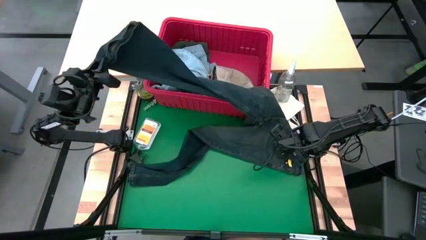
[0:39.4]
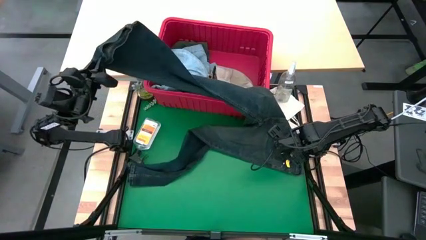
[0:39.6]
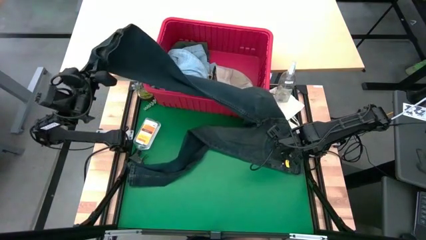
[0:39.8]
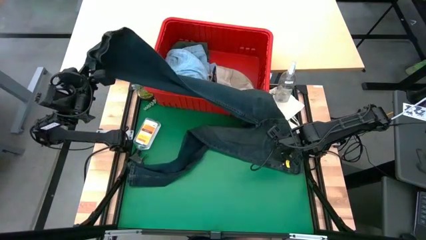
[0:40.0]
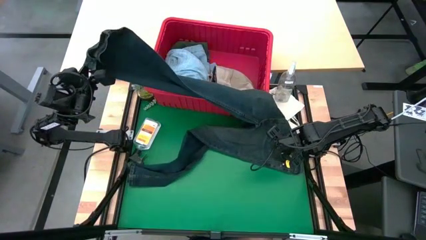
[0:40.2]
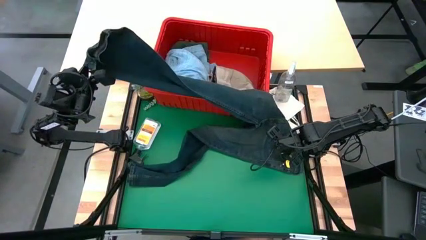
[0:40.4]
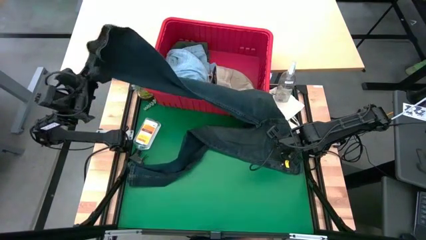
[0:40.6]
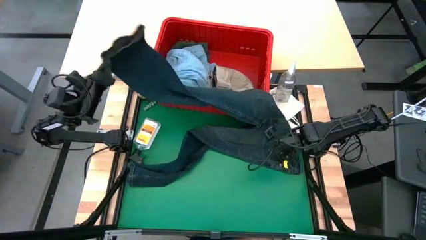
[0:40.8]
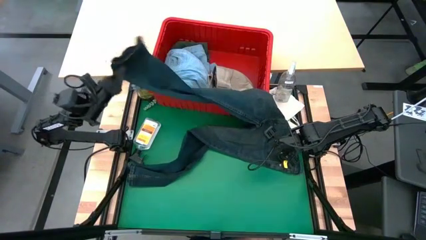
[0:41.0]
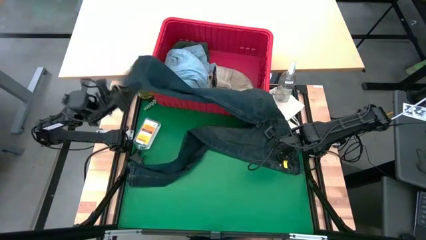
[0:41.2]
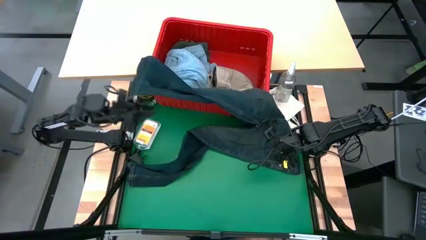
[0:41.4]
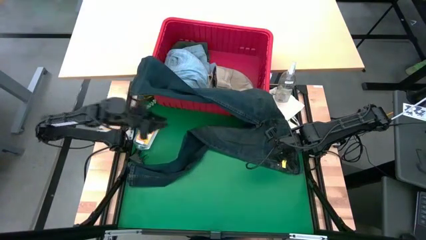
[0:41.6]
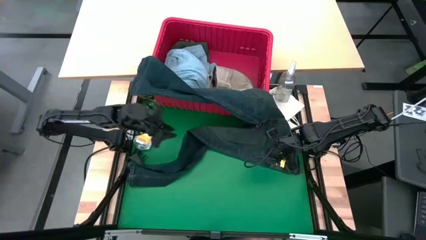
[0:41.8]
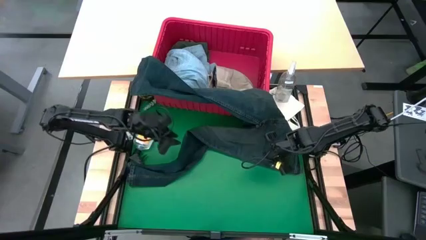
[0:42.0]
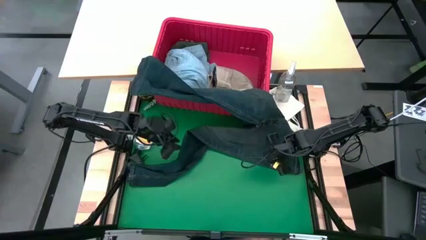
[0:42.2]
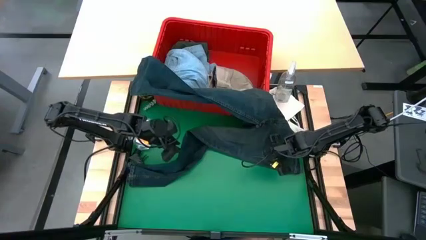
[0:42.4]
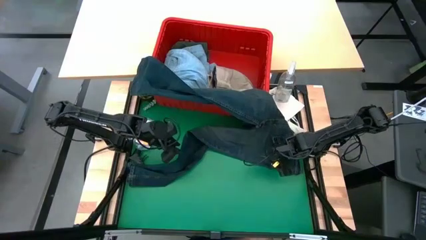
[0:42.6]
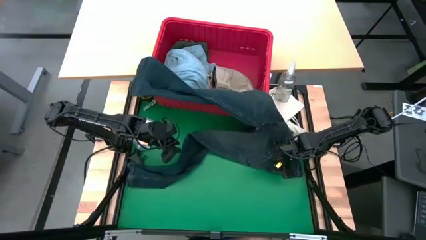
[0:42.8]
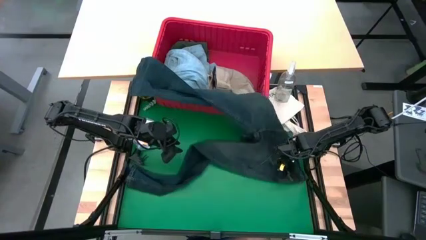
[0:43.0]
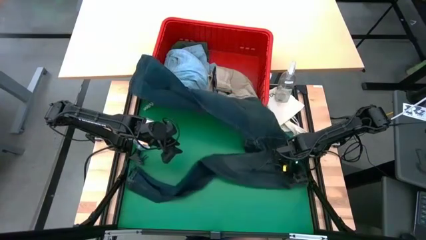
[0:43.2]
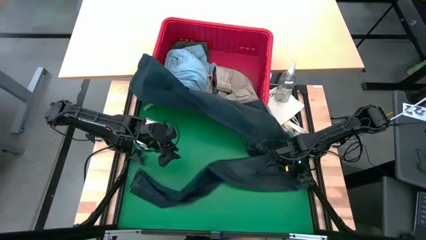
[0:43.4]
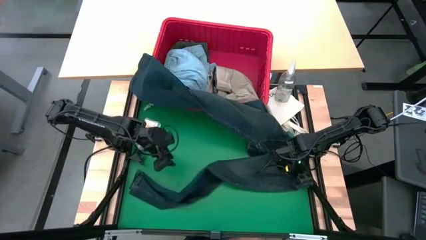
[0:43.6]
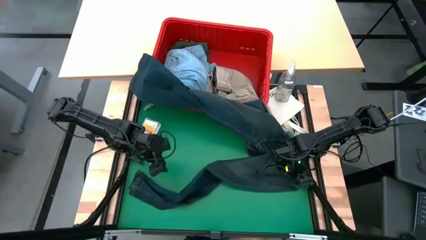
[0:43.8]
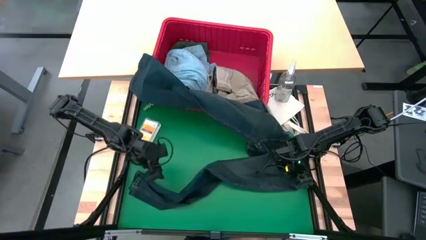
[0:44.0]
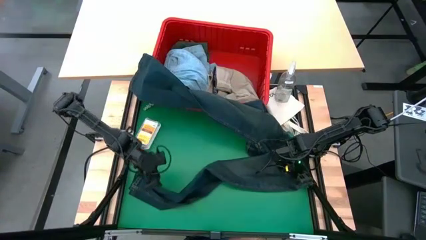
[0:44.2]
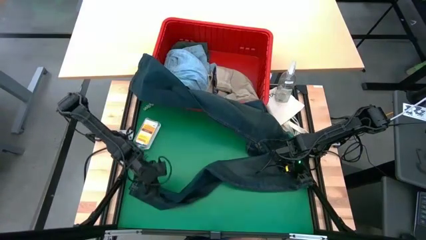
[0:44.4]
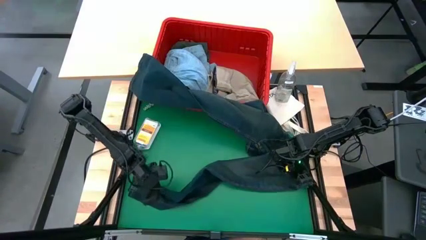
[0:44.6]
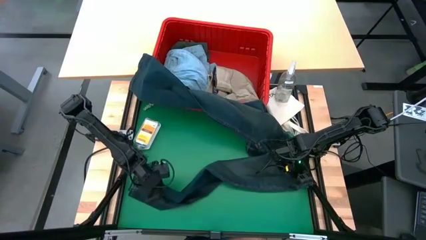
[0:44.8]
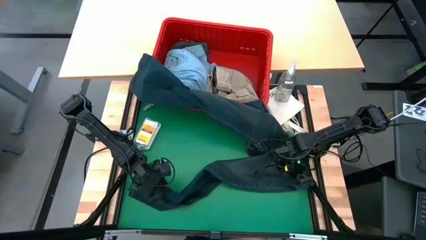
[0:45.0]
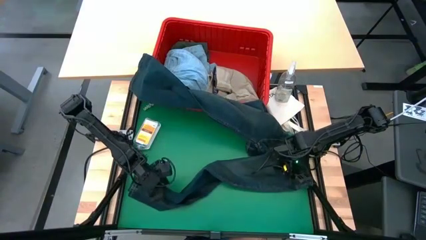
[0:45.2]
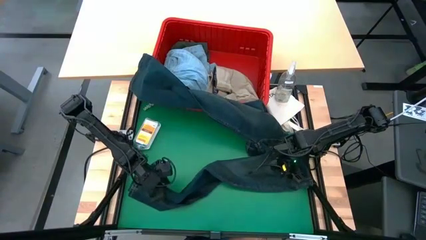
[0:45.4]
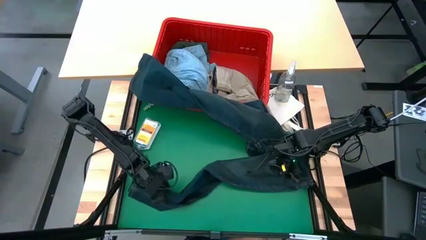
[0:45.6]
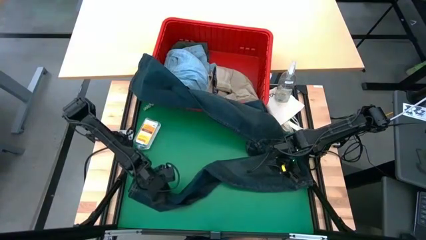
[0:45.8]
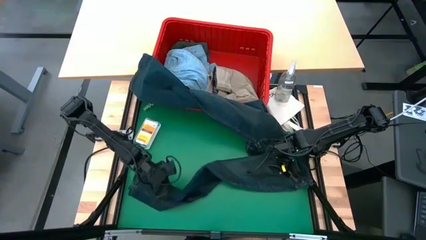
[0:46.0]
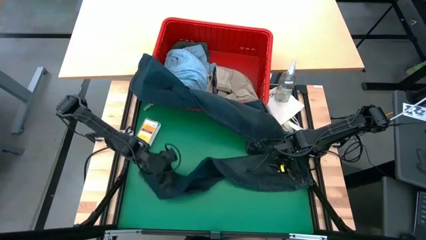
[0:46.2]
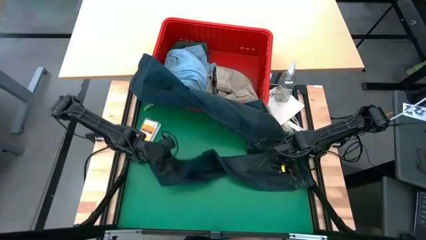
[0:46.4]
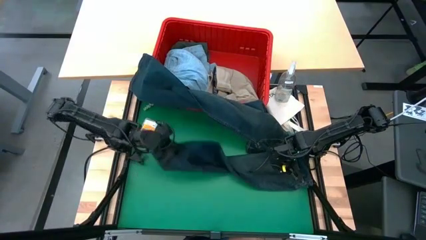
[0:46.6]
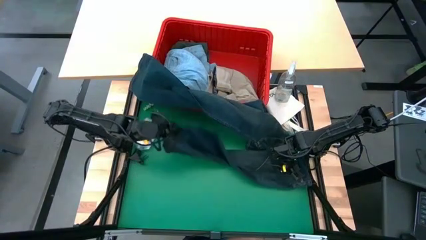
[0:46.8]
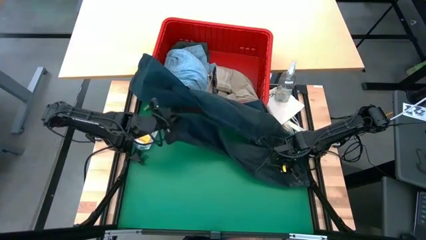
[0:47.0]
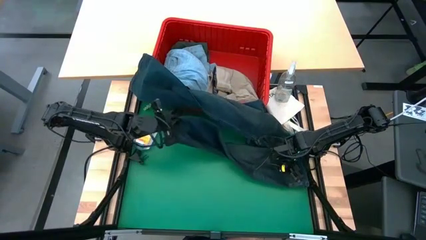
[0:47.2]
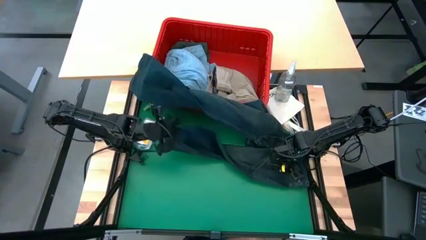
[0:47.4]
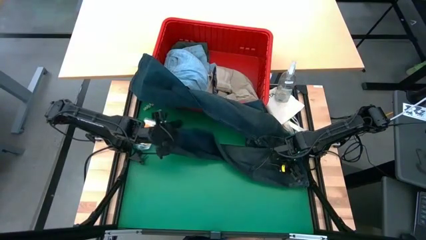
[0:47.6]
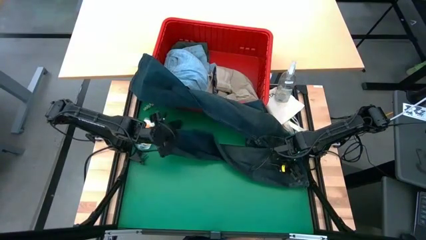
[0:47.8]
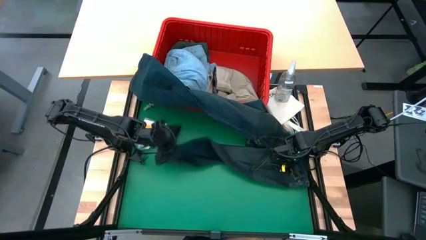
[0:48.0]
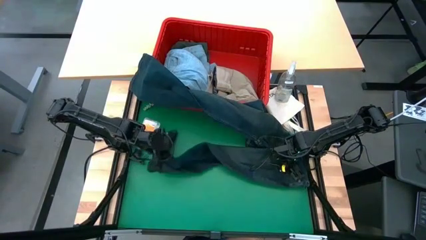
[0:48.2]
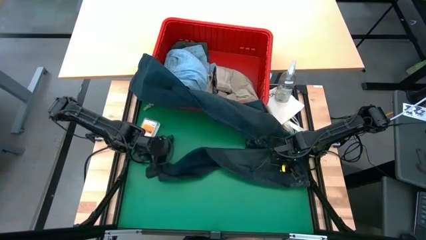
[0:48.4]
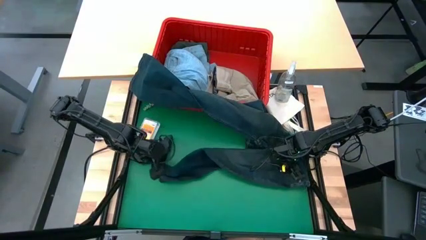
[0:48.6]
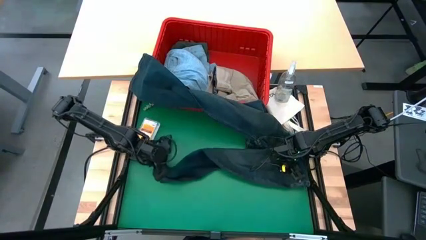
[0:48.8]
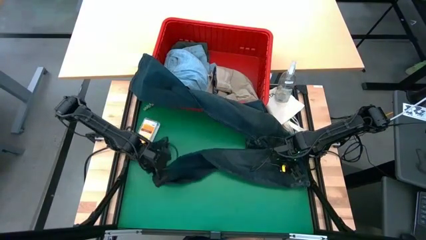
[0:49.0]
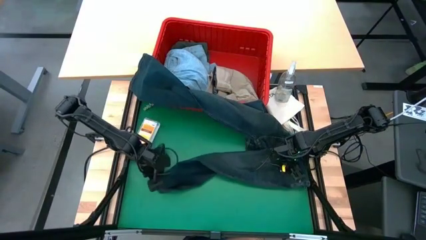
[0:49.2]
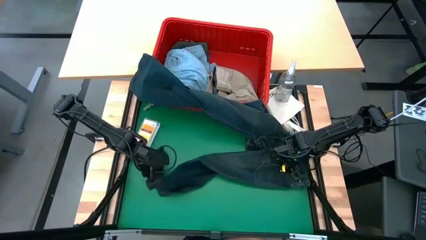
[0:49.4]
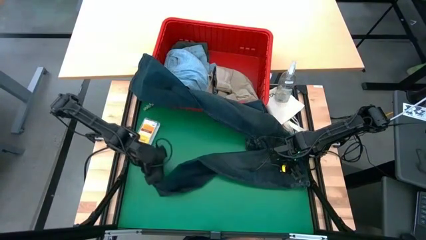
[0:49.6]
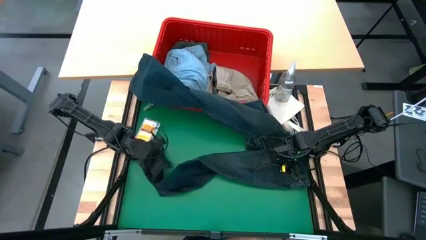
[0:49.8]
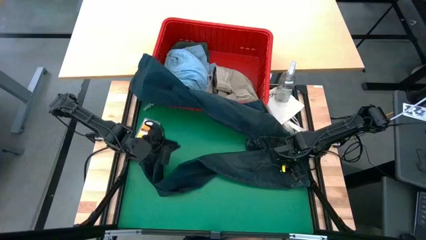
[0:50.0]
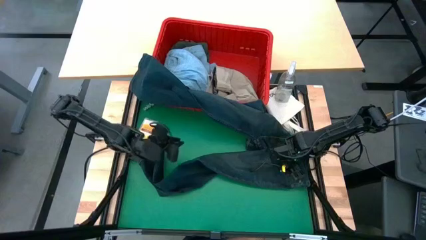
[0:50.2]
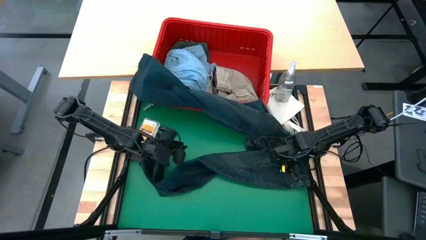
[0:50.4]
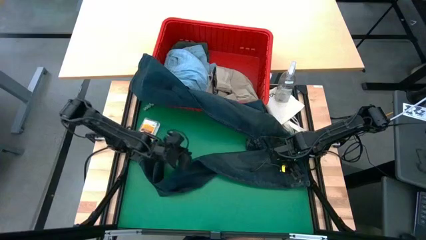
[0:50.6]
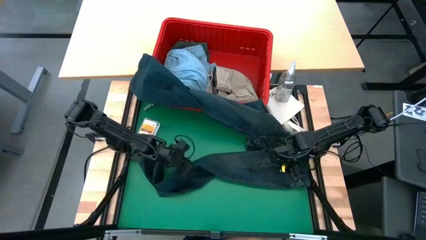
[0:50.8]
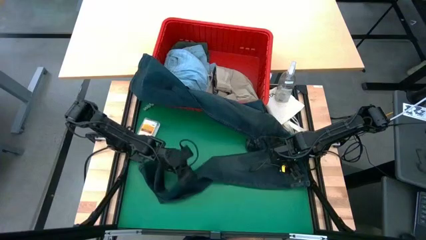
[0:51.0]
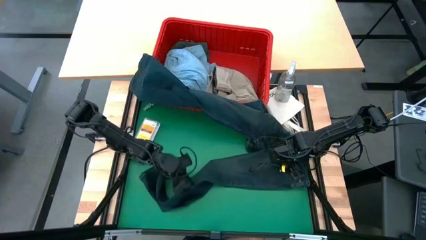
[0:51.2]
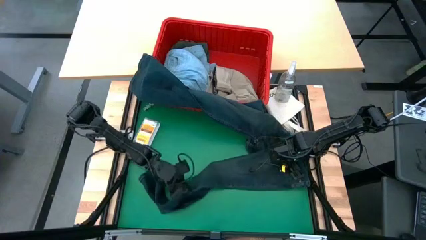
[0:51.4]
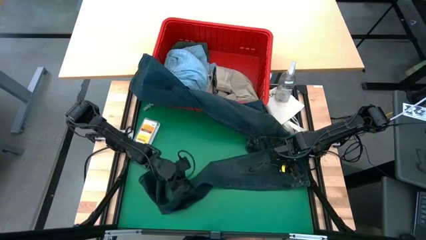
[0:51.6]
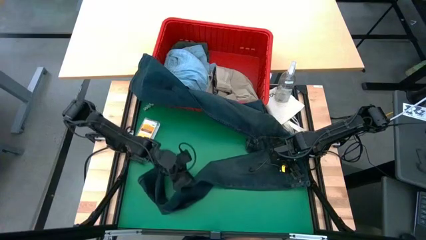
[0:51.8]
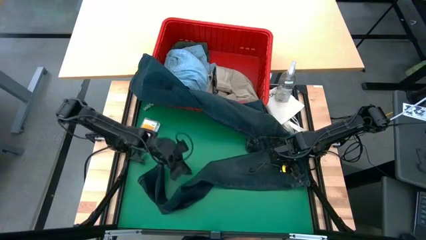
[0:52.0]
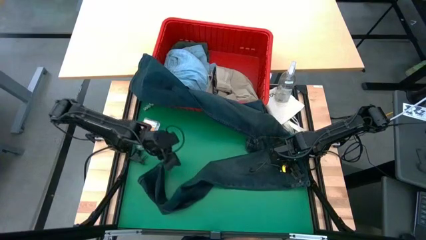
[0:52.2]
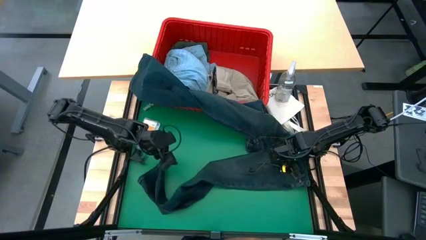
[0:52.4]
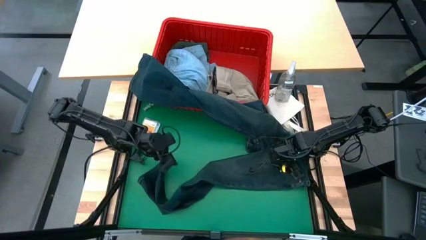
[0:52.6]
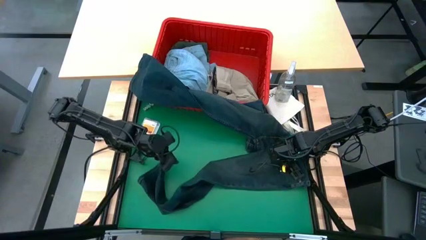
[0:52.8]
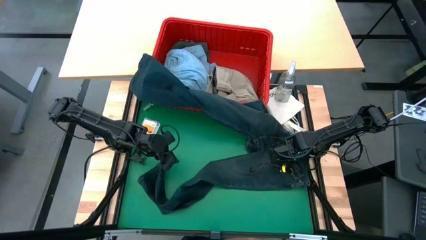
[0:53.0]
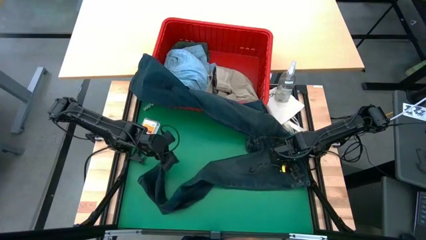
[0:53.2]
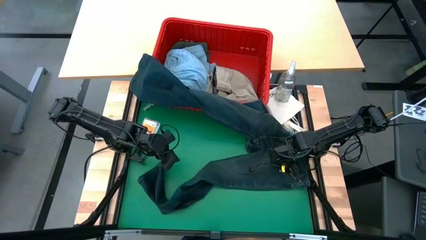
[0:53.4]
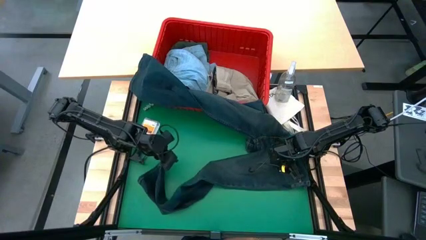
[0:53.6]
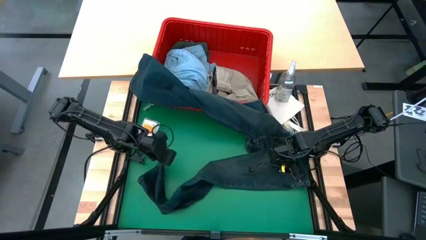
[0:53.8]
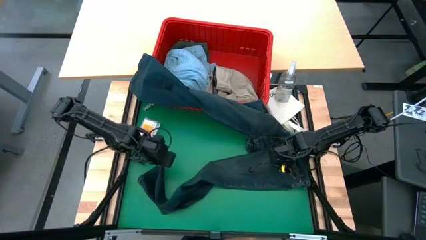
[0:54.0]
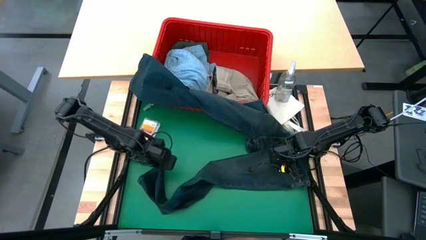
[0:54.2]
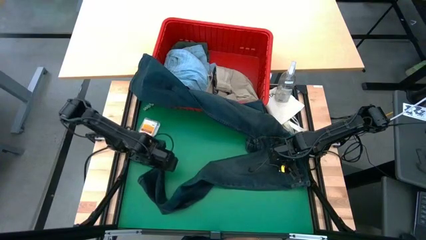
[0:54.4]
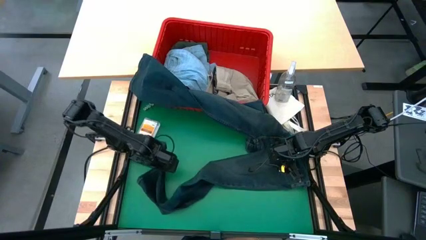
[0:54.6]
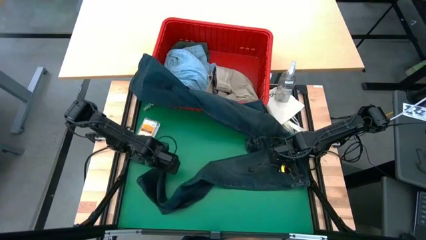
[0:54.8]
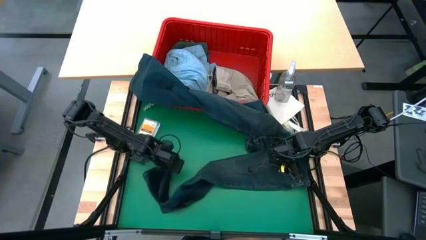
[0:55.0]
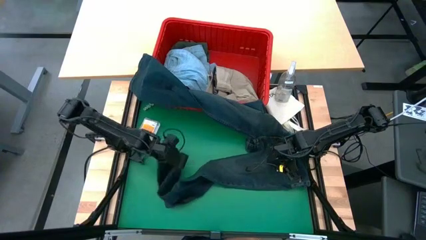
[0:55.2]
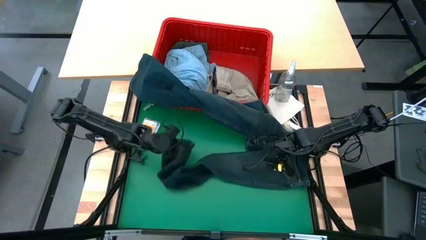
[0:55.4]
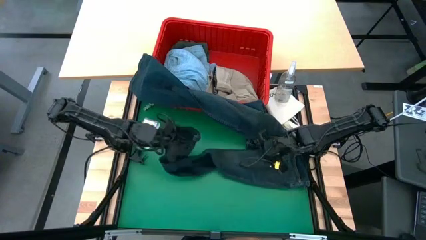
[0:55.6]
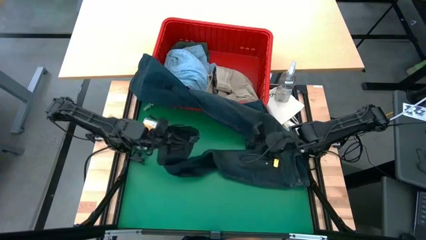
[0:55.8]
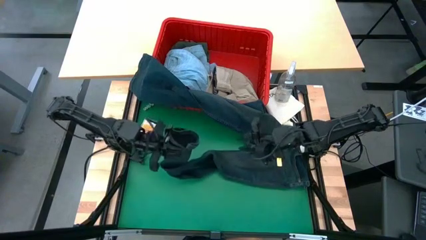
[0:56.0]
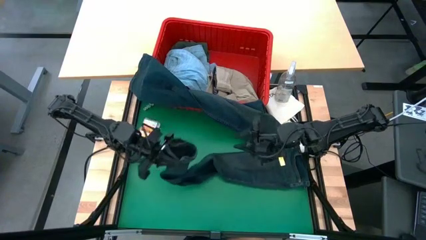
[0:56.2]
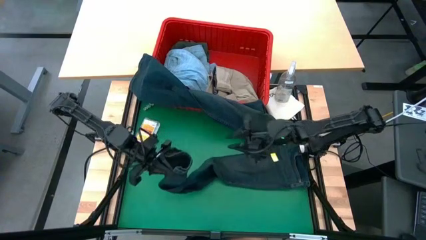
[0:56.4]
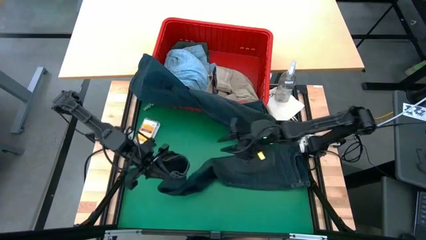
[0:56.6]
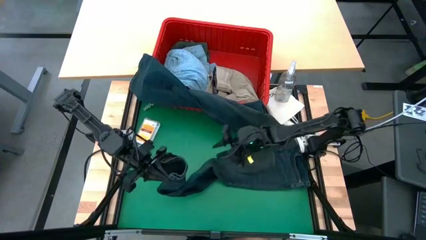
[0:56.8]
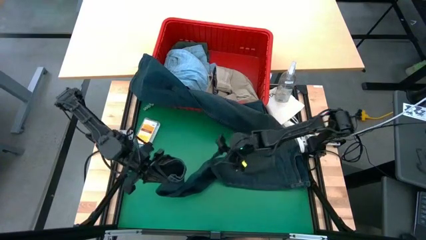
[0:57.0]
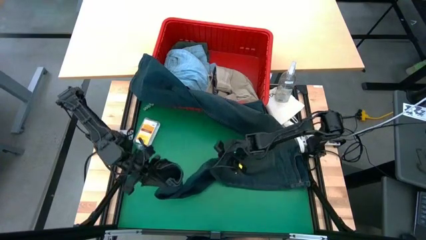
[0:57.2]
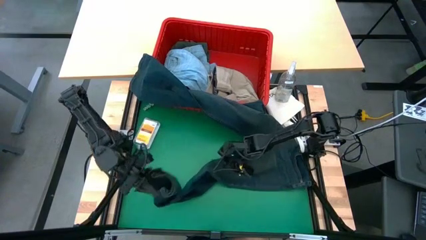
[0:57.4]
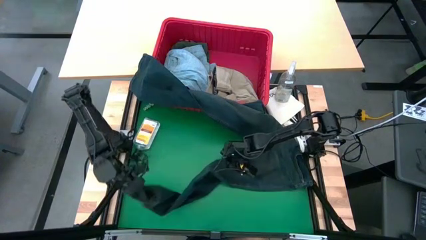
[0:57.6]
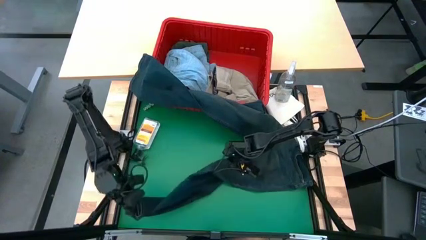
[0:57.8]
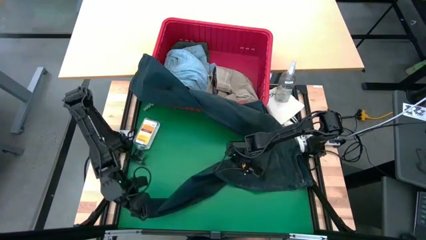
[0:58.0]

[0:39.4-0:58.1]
Task: Fold laundry
Fold the dark blue jeans
